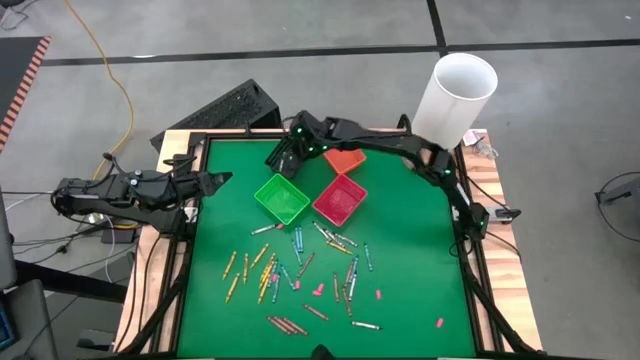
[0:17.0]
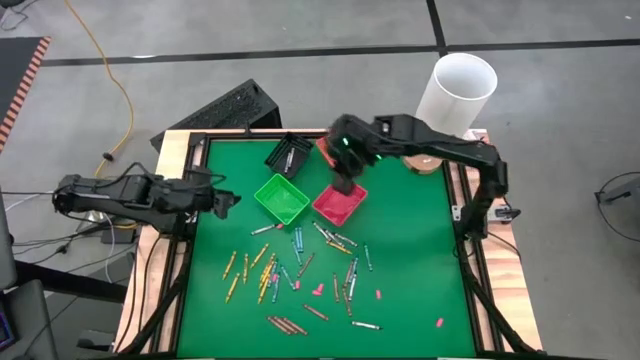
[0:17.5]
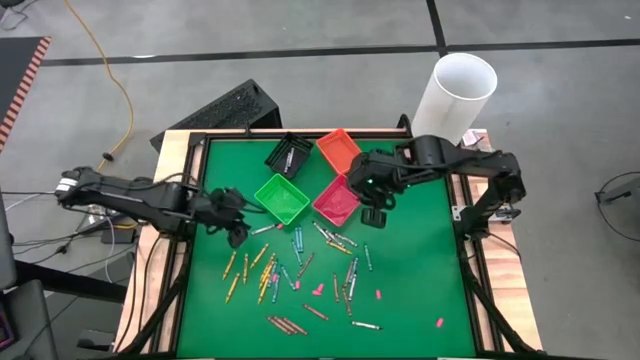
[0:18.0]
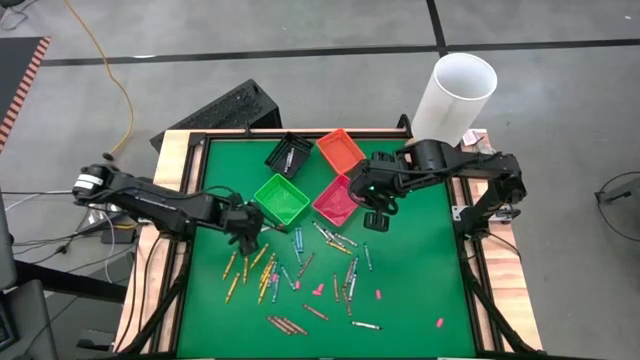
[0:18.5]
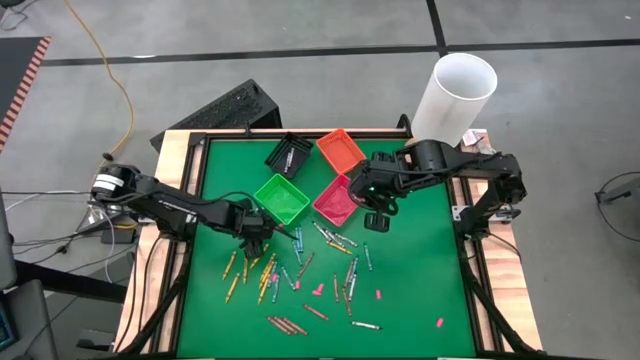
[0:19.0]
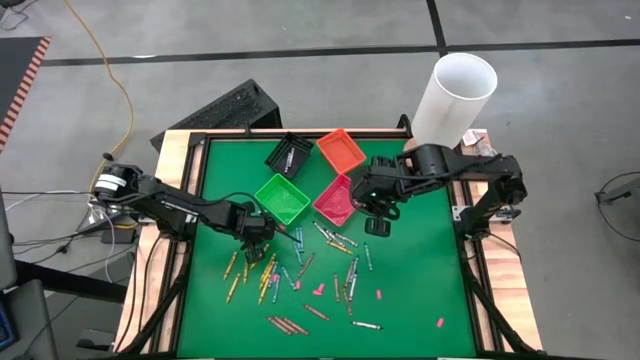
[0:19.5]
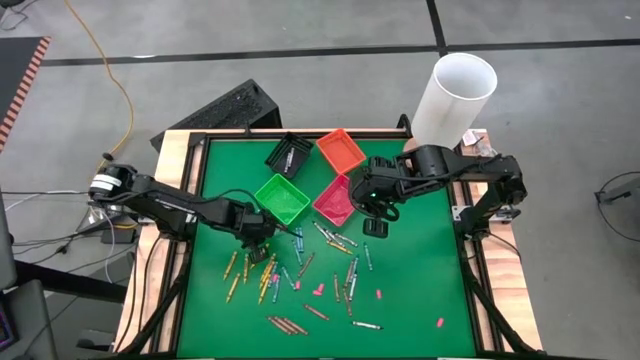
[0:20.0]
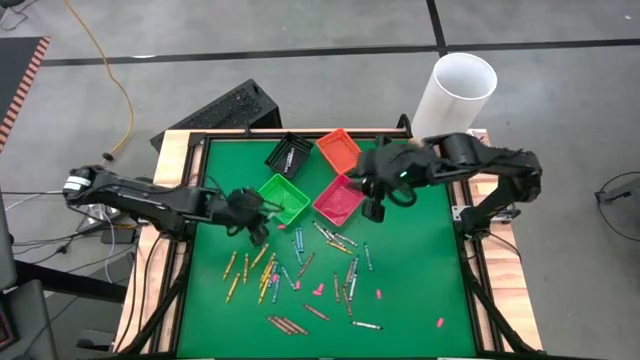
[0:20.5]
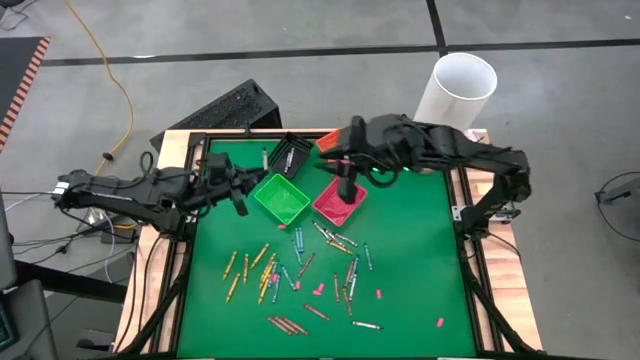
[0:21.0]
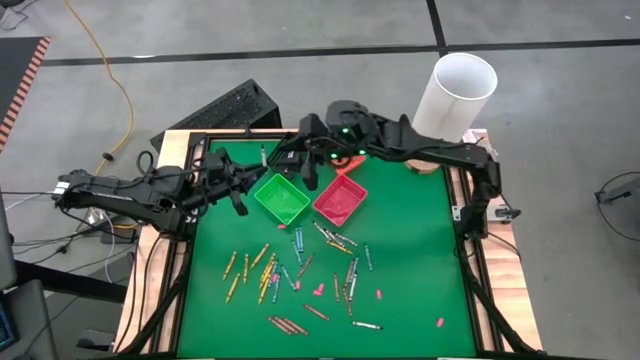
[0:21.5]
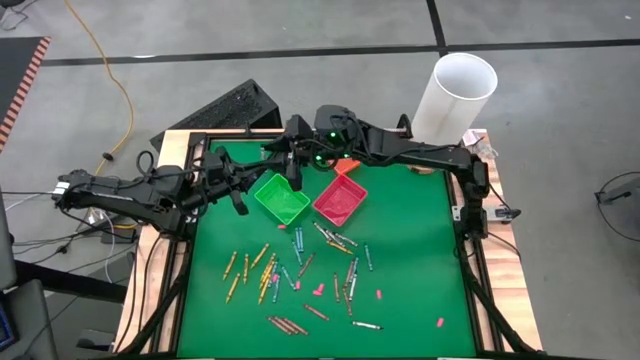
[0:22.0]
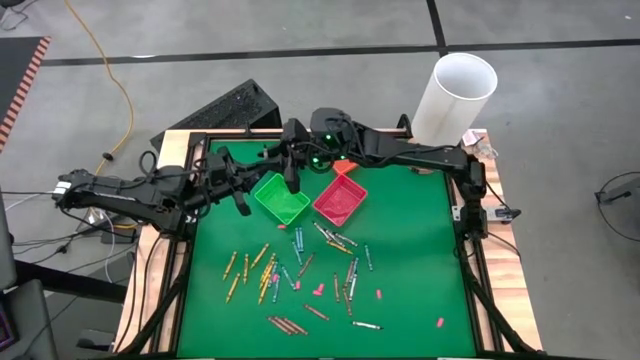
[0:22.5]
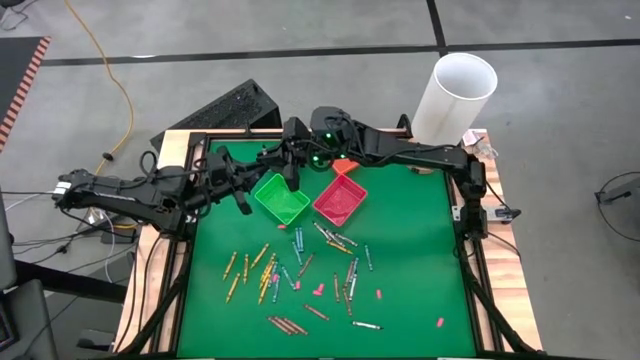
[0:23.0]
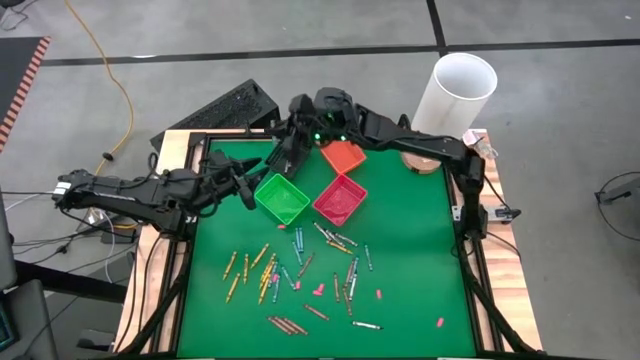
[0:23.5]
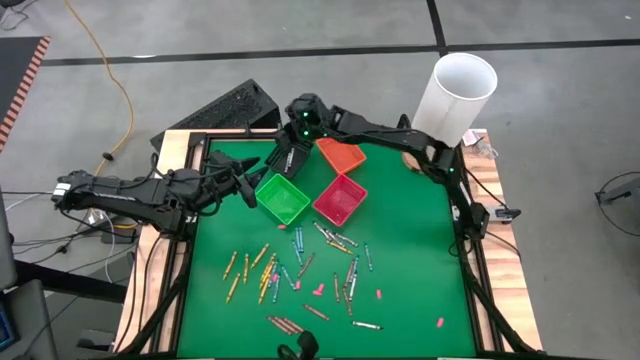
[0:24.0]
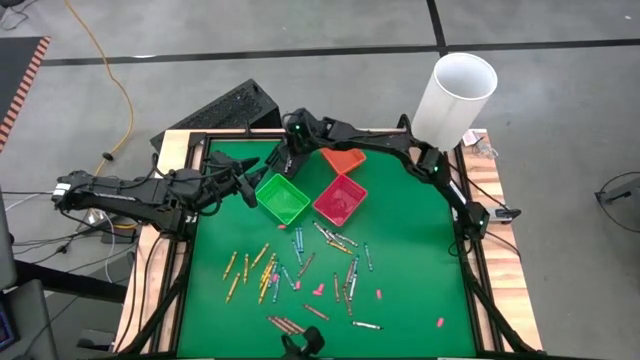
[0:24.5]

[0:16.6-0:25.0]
Task: Sort crayons
Put the black crayon into the black bin

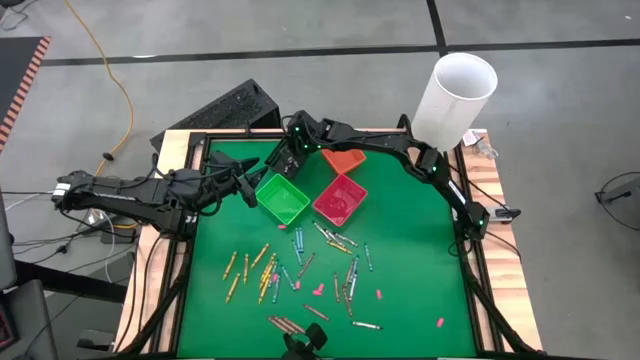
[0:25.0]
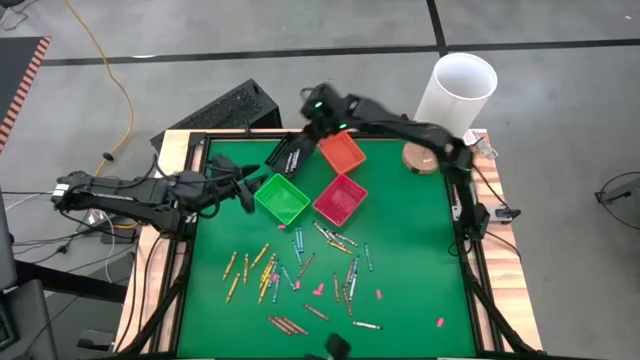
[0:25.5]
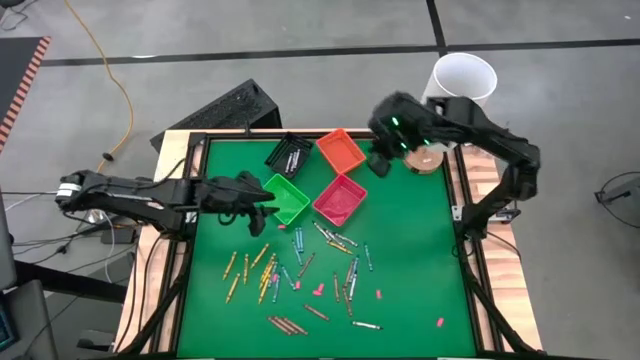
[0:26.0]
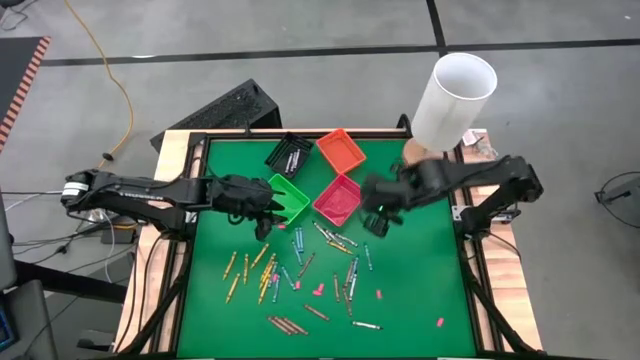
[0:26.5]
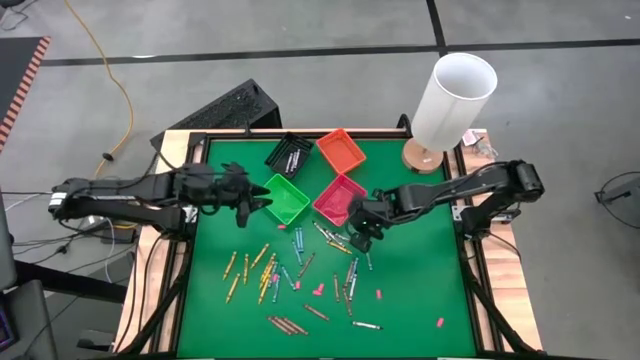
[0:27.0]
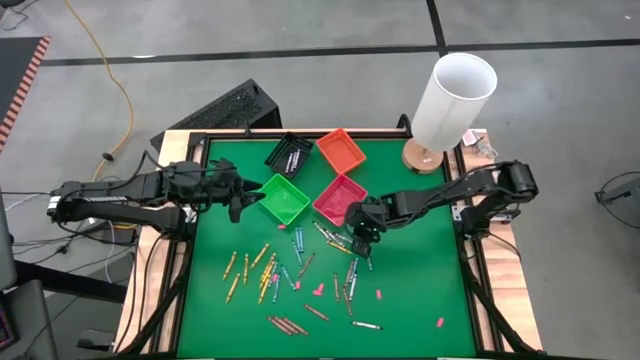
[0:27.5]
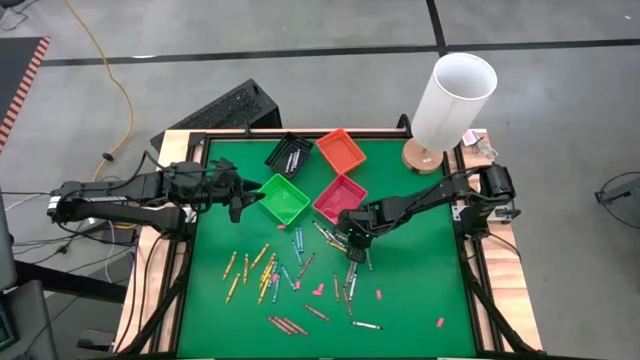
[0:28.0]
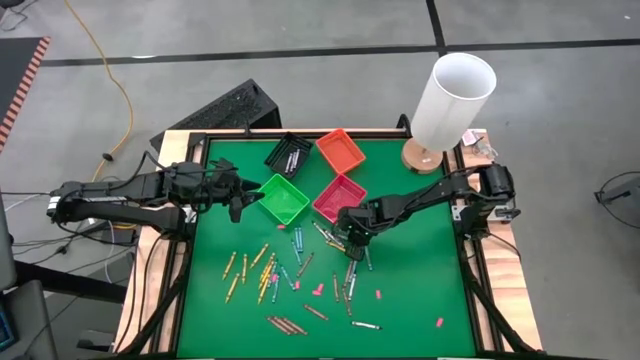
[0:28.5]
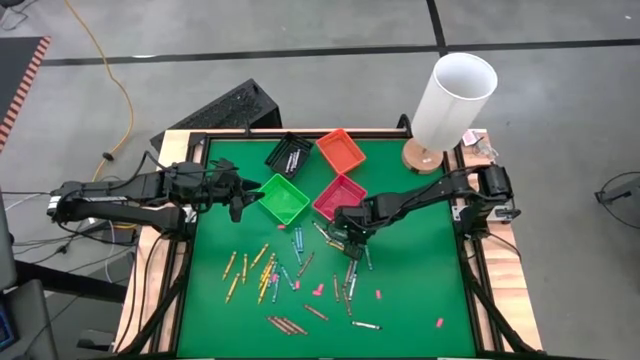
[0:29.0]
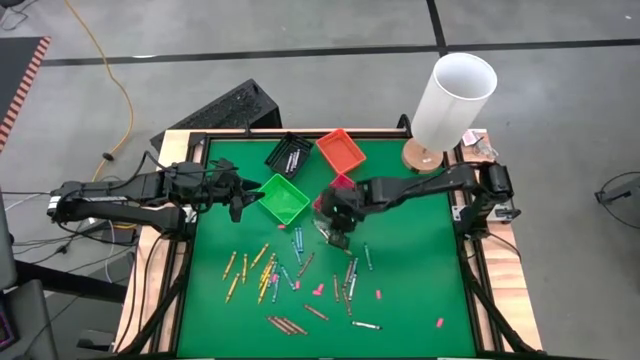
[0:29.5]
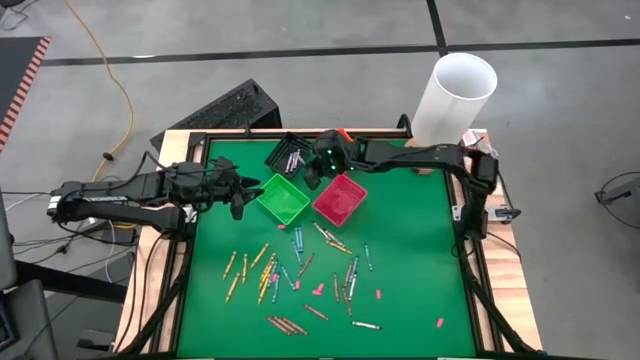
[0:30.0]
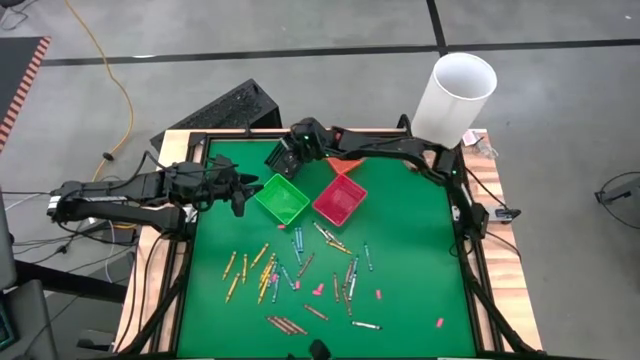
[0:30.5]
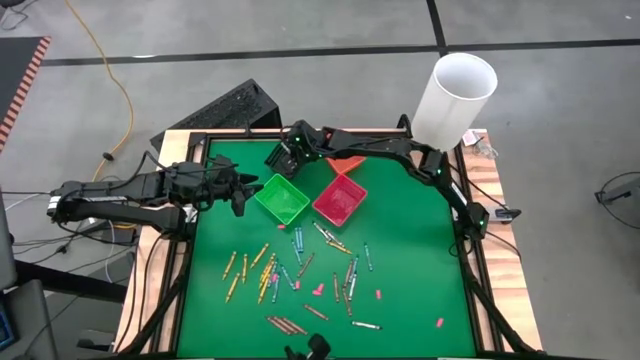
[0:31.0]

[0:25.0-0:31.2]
Put the black crayon into the black bin

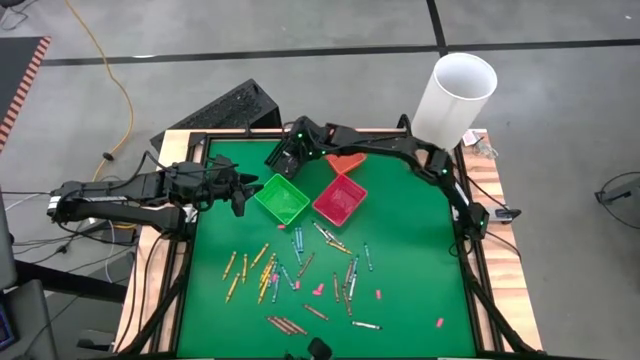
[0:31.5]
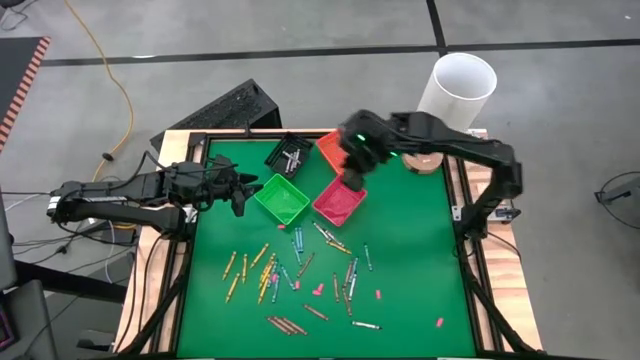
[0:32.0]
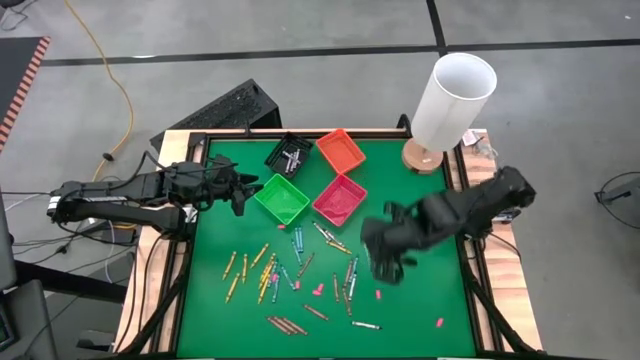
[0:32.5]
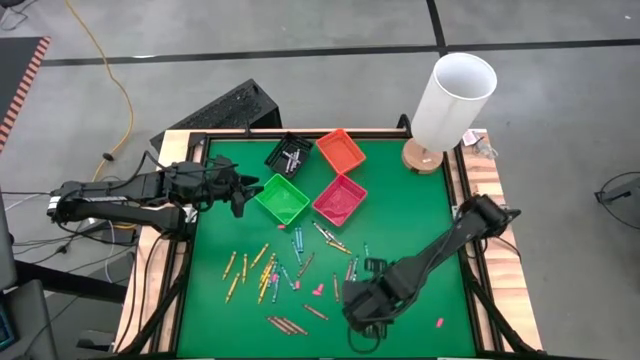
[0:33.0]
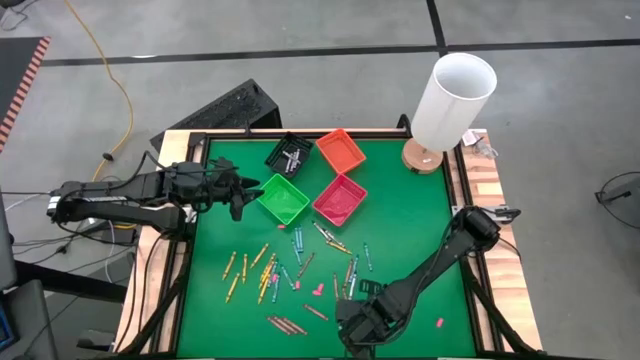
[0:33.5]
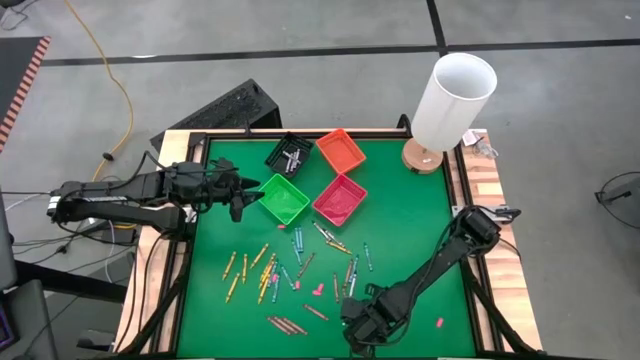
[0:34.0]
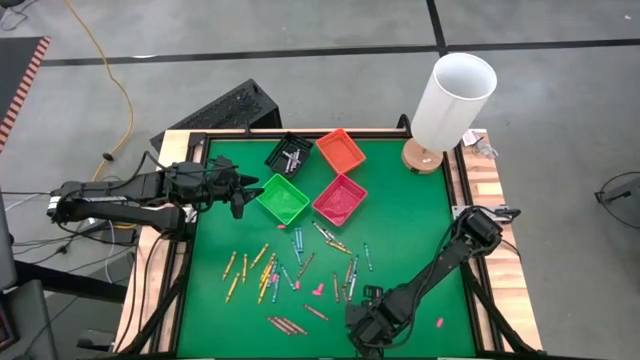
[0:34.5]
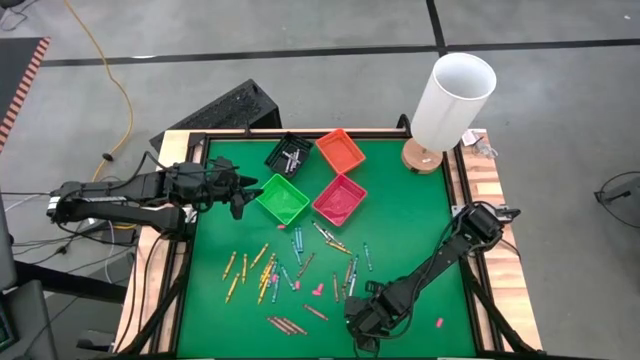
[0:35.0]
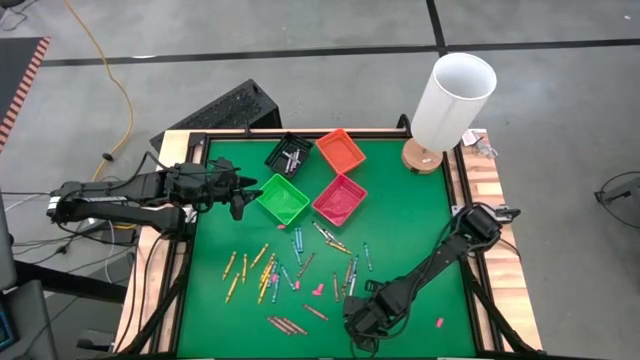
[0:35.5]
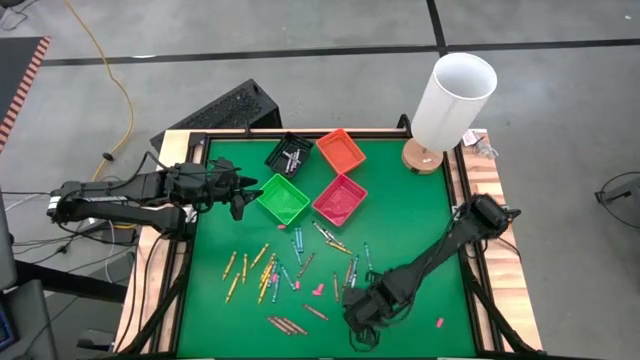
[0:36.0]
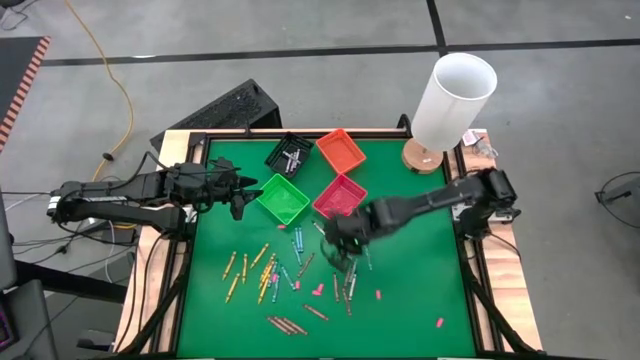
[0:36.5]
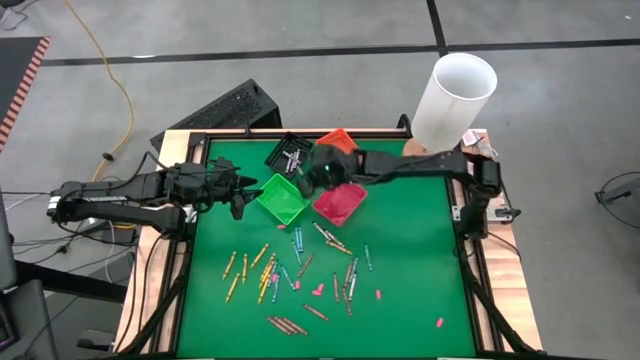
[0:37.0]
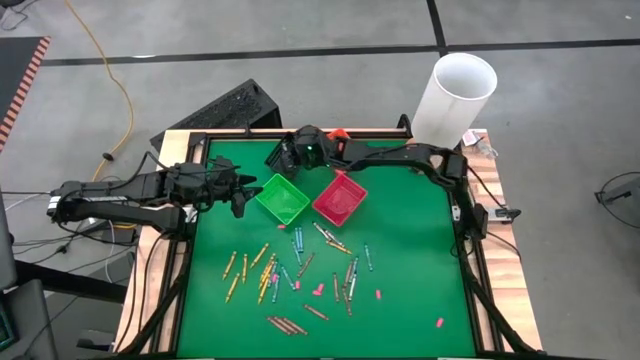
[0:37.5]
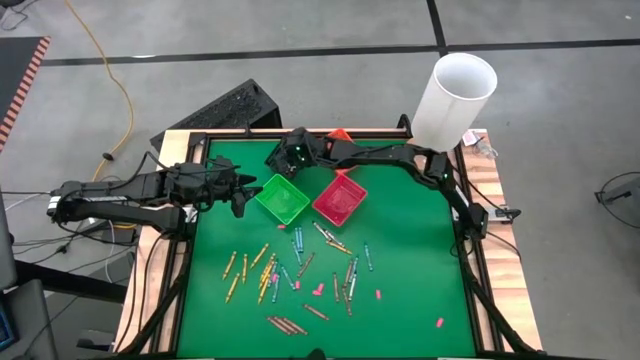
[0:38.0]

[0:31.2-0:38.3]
Put the black crayon into the black bin
